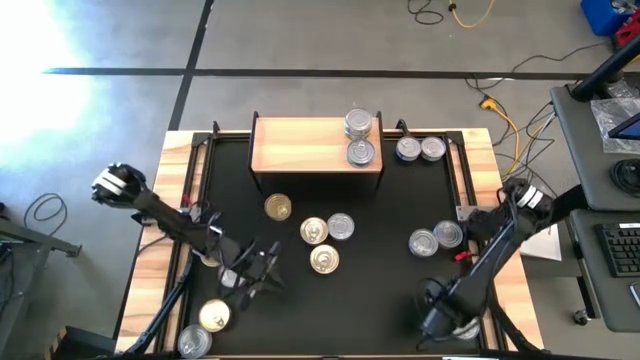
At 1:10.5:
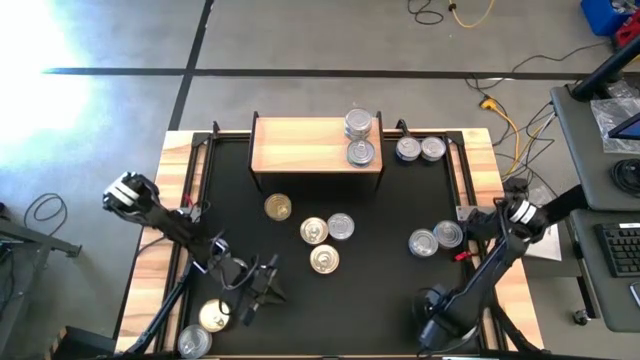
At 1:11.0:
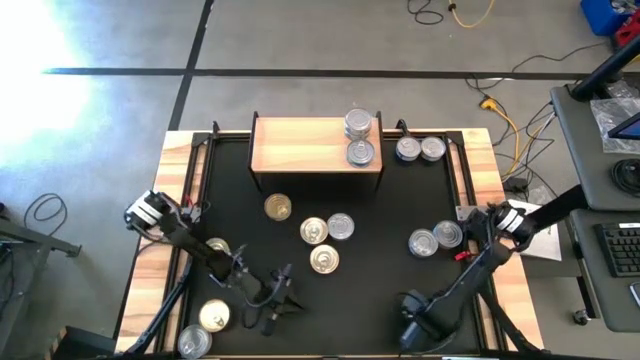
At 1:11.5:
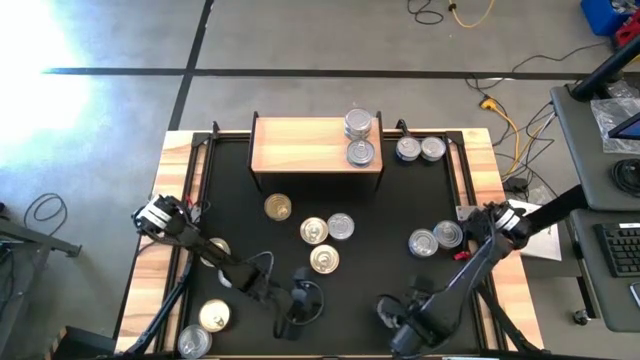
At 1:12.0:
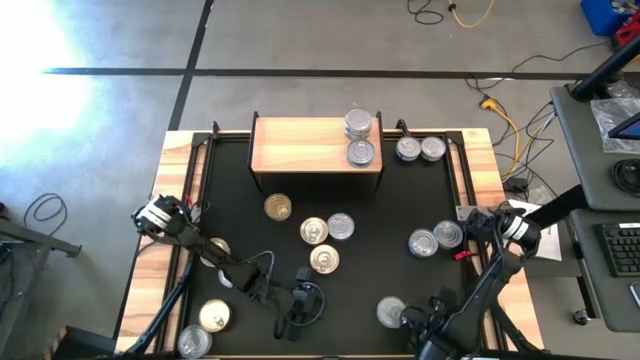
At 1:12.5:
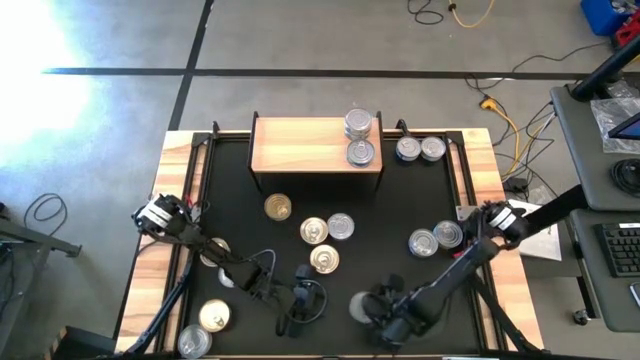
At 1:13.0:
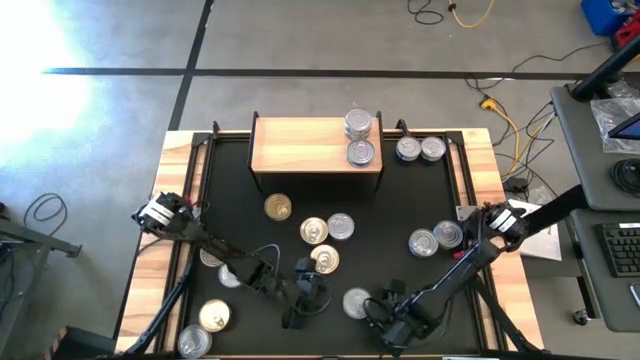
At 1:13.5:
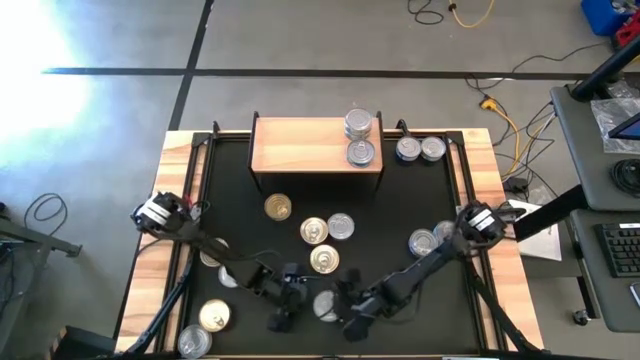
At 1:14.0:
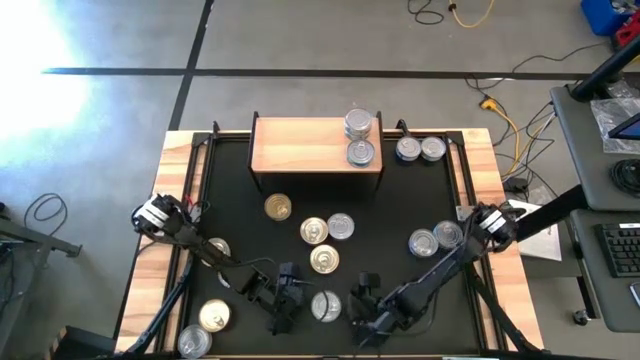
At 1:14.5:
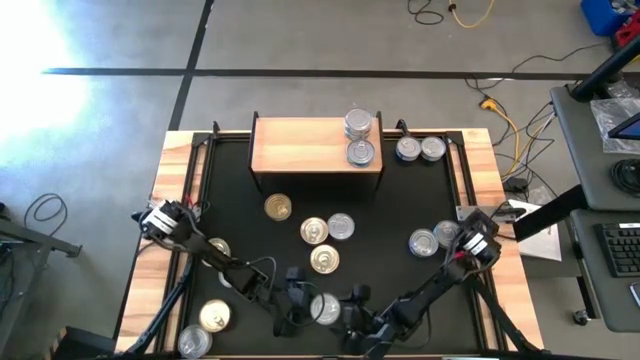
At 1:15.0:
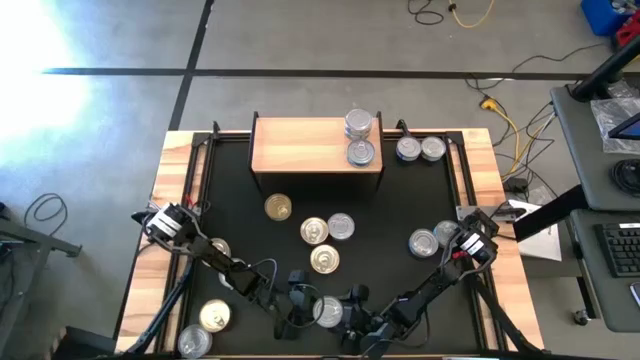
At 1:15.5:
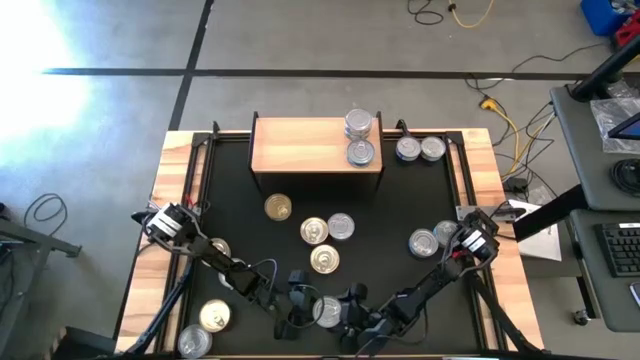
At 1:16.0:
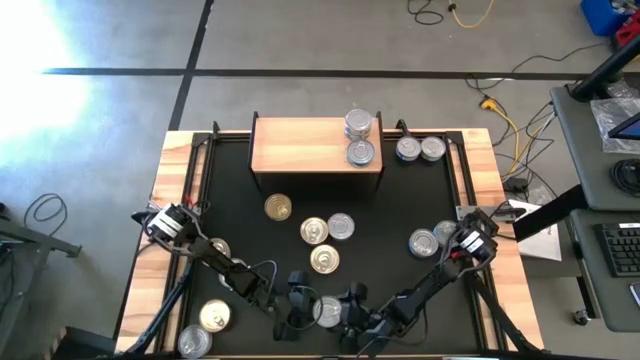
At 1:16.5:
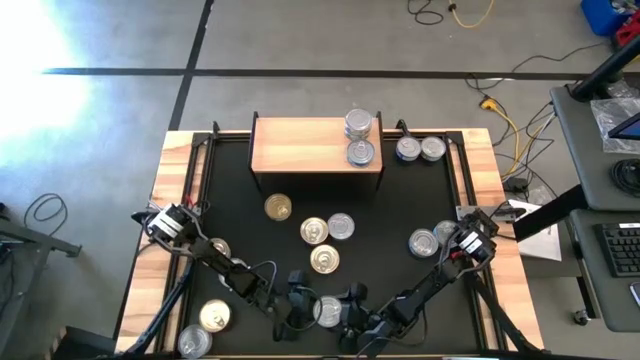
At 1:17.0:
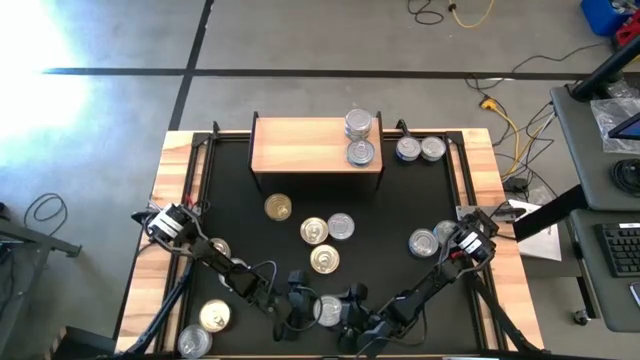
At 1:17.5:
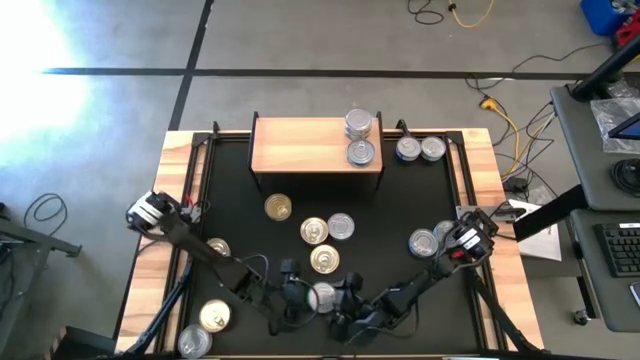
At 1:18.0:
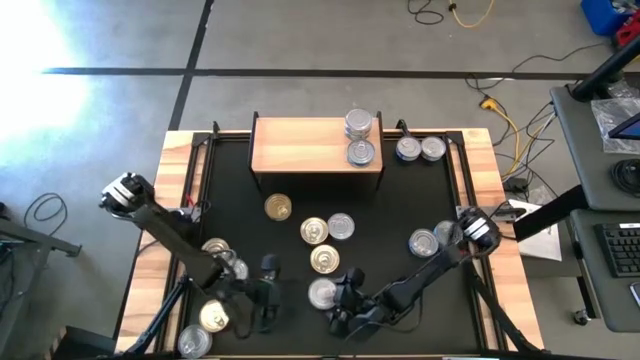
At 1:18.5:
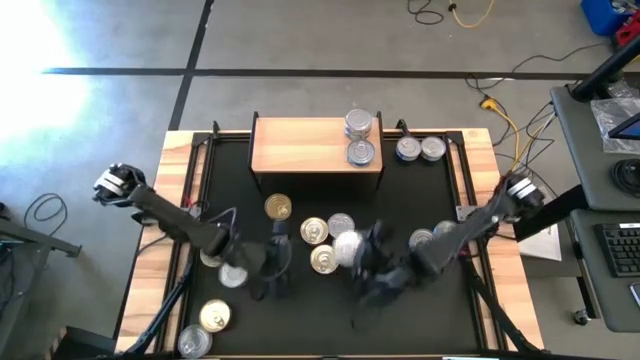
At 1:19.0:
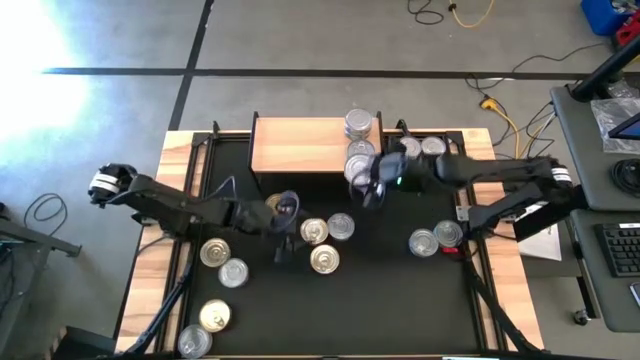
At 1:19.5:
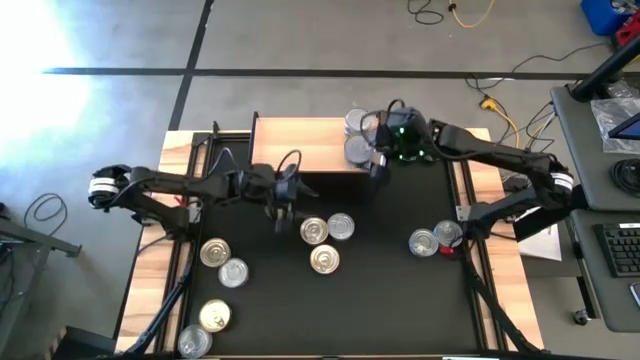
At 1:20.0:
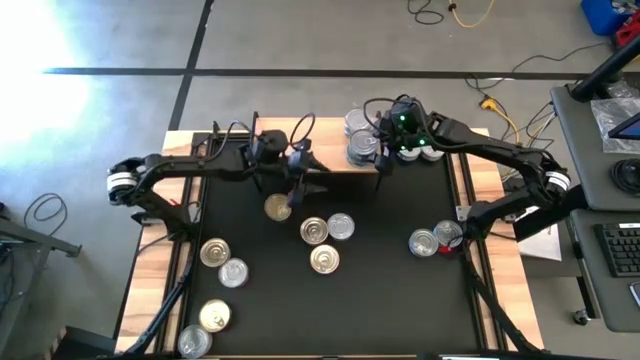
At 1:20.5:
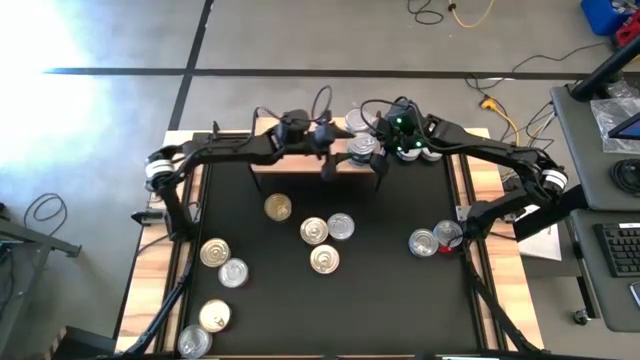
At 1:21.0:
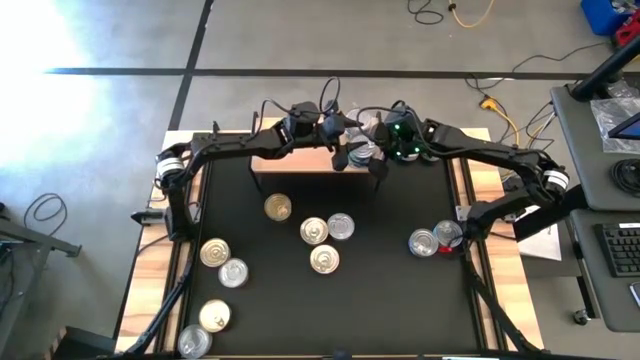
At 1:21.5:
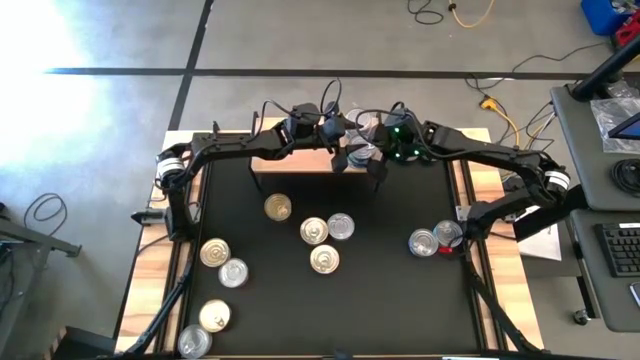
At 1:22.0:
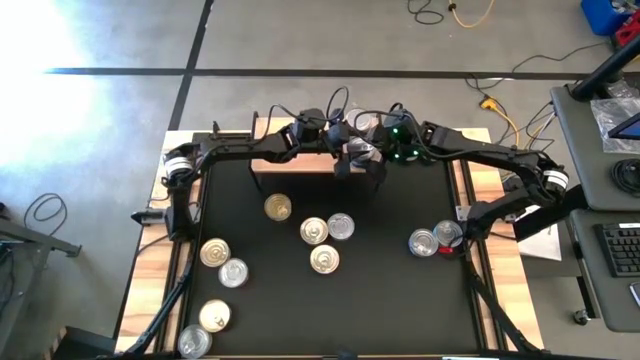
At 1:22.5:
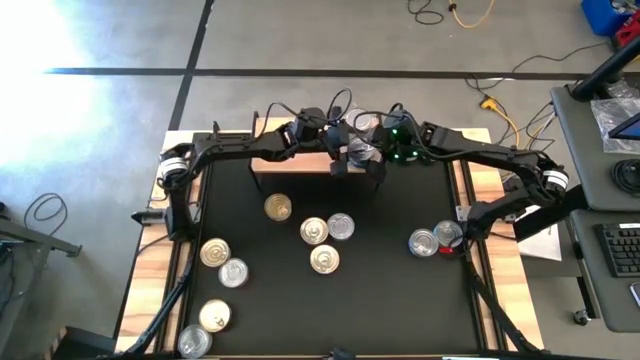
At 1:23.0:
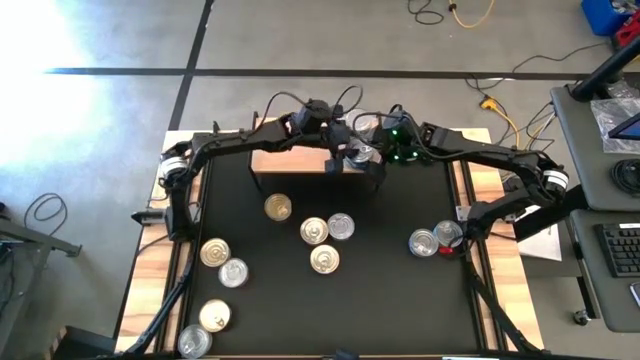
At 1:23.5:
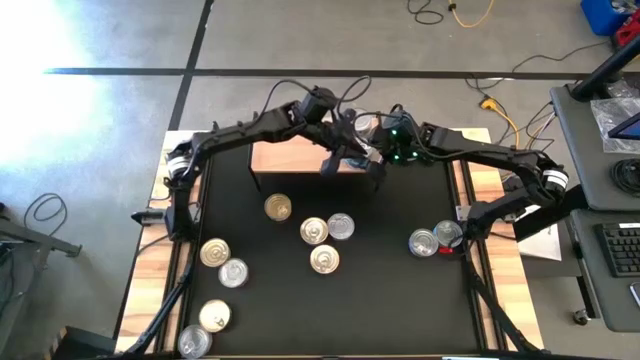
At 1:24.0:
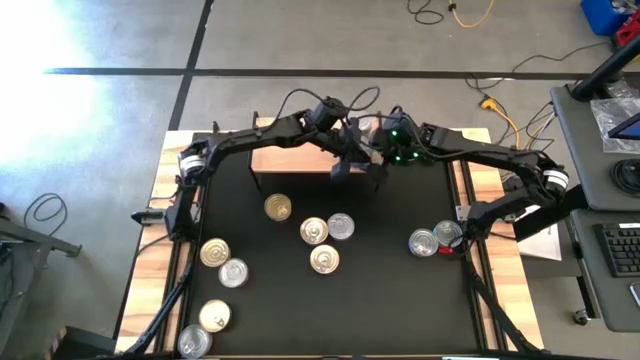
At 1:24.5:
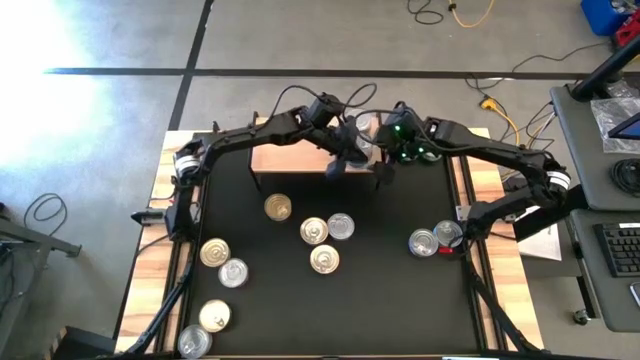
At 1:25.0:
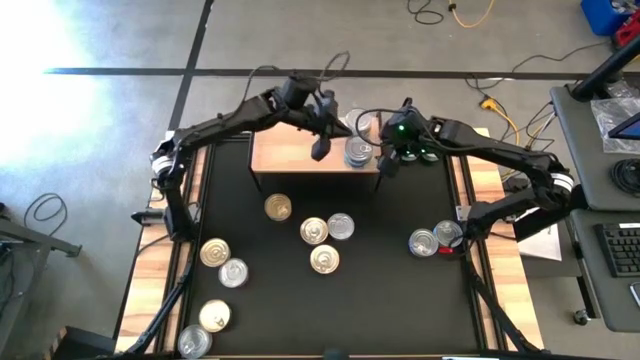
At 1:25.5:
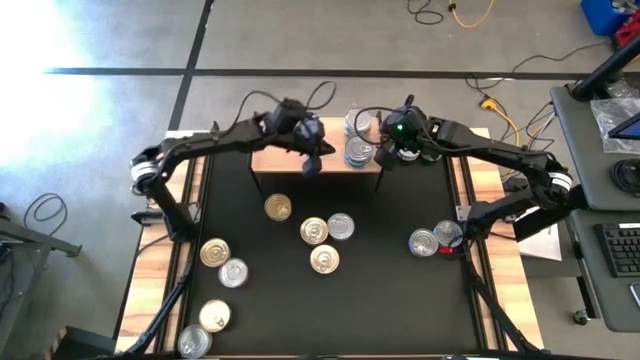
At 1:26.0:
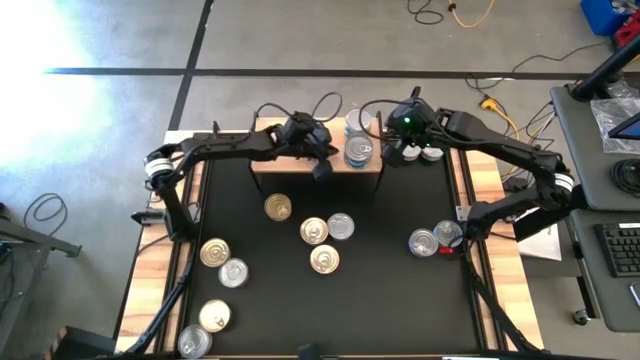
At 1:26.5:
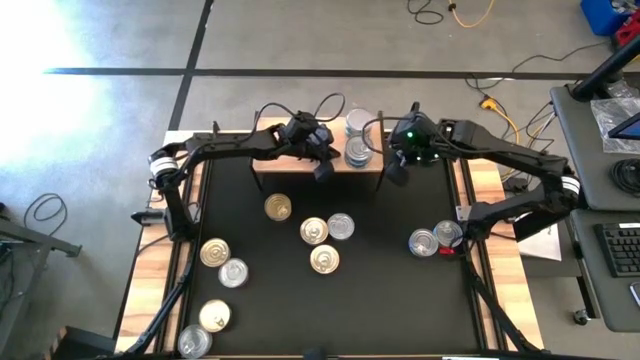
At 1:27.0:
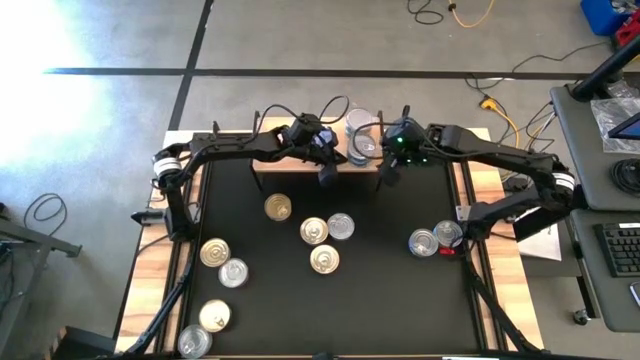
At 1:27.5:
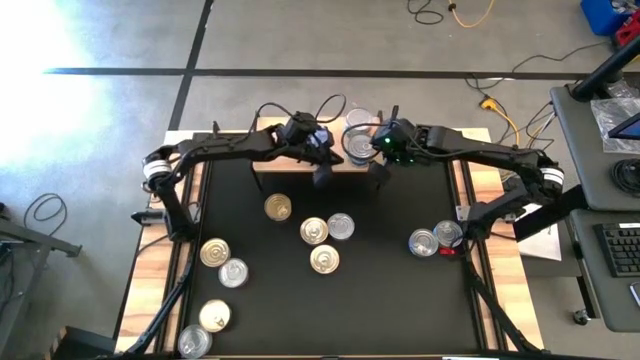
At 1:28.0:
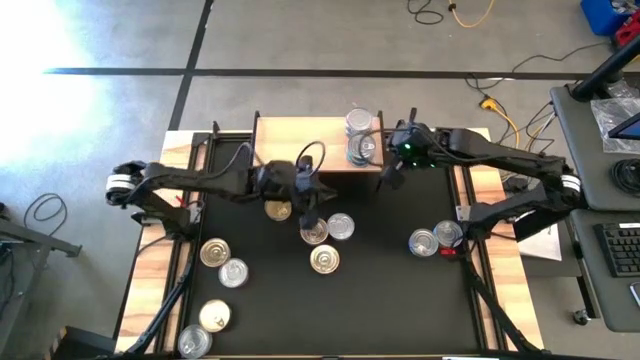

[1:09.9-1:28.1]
Task: Stack canned seafood by type on shelf
Stack the light blue tuna can on top of the light blue tuna can on the shelf

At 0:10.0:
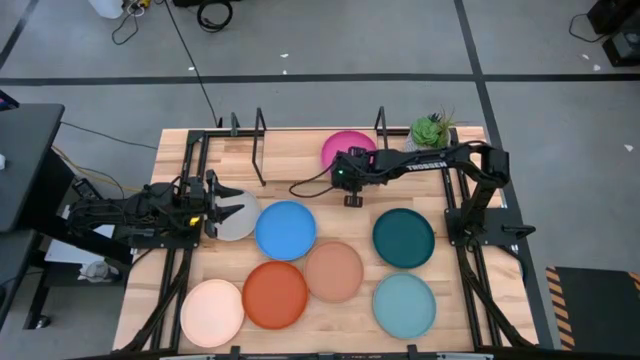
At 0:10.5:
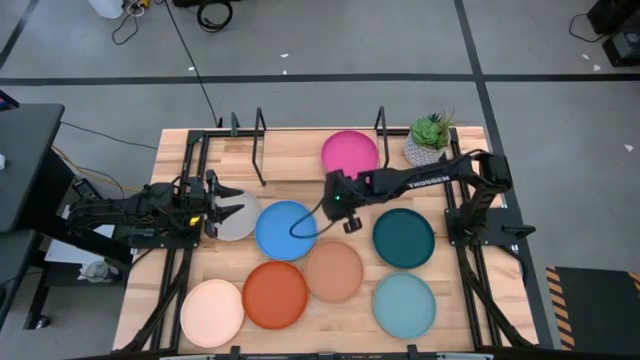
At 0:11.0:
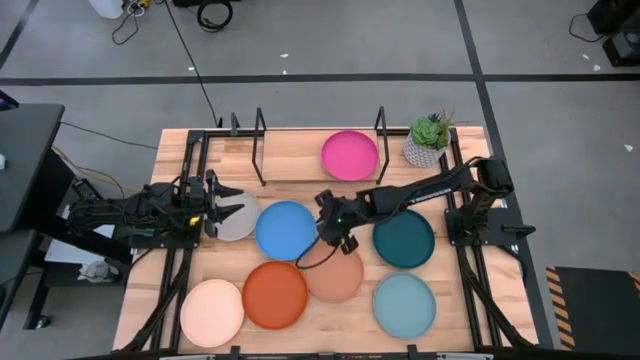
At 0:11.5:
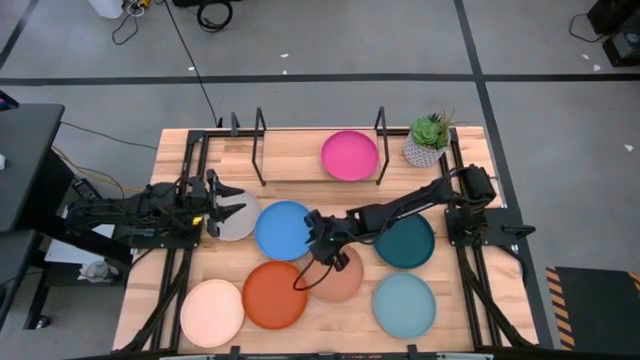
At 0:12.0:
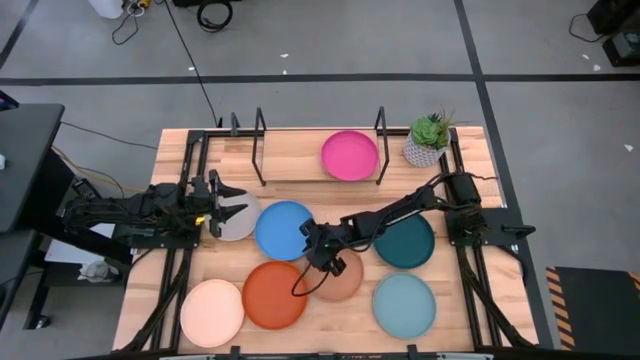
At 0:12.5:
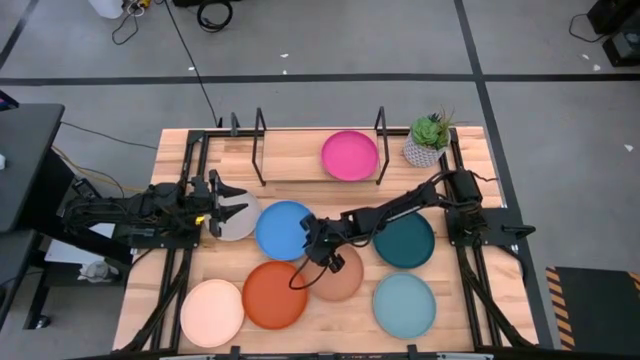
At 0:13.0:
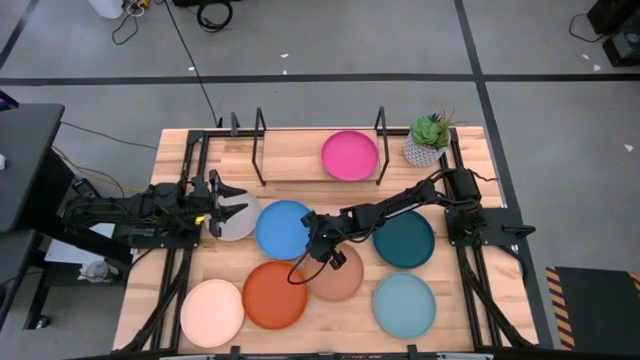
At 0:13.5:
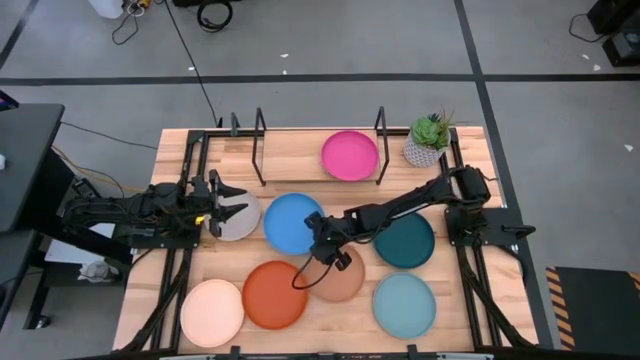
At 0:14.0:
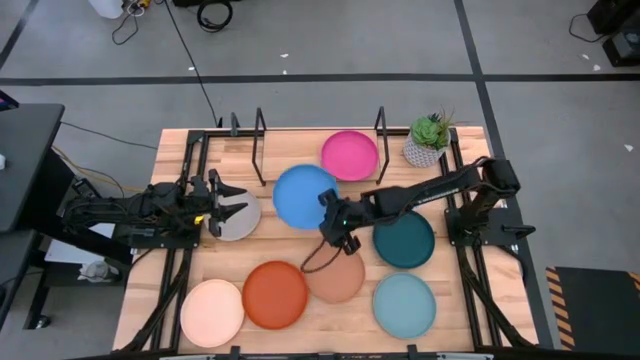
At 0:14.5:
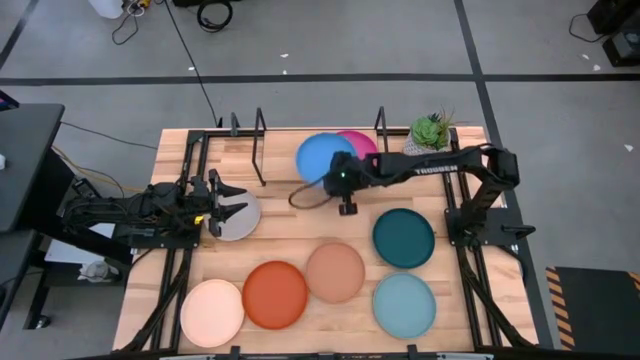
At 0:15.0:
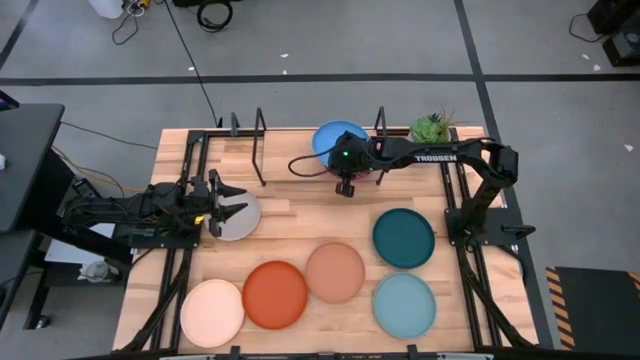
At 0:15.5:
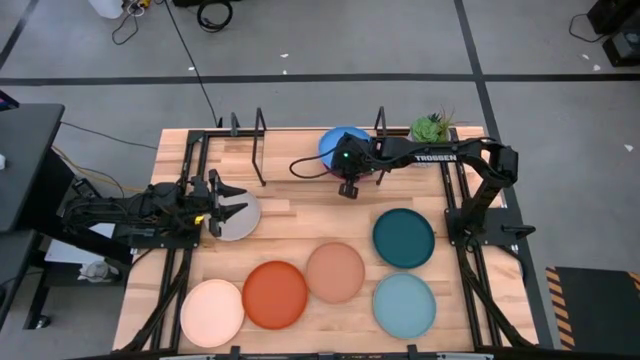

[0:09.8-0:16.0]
Task: Place and stack plates onto a shelf
Stack the blue plate on top of the pink plate on the shelf
